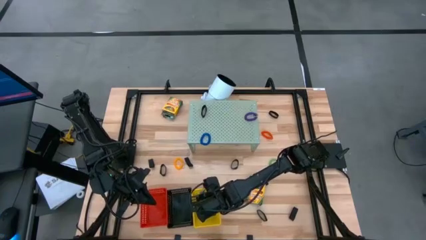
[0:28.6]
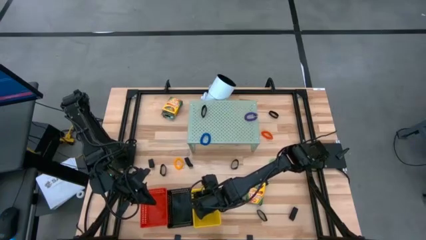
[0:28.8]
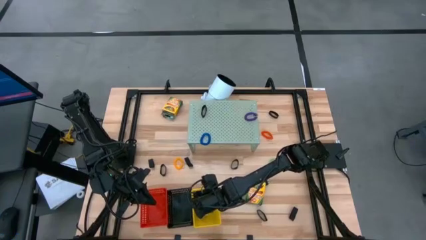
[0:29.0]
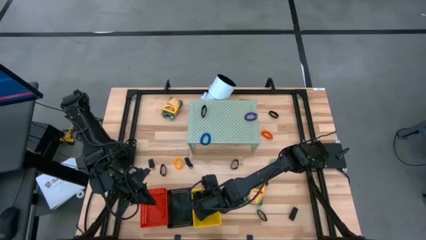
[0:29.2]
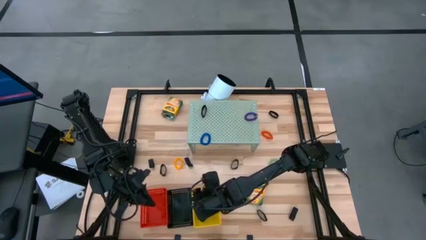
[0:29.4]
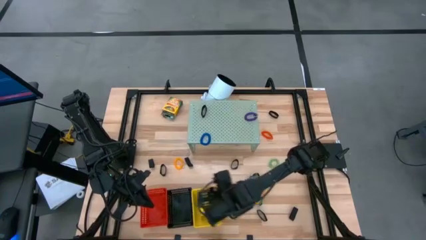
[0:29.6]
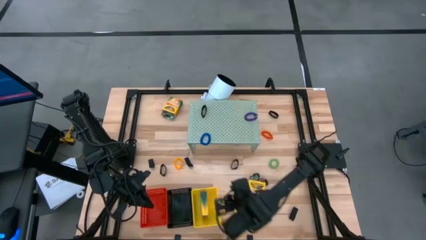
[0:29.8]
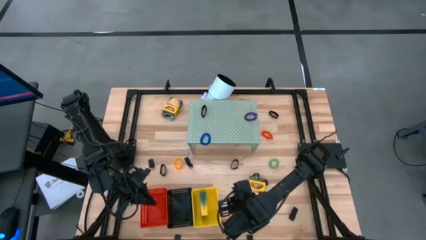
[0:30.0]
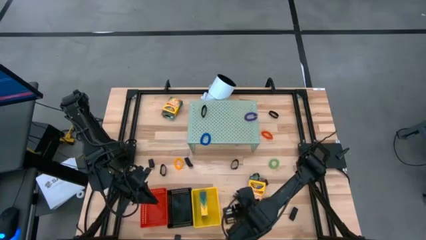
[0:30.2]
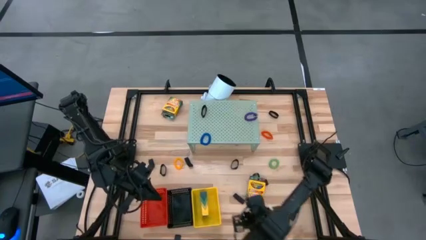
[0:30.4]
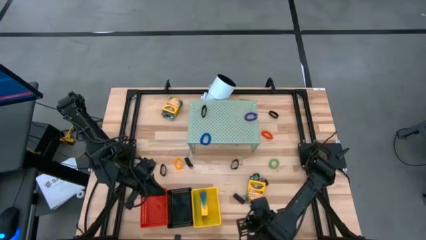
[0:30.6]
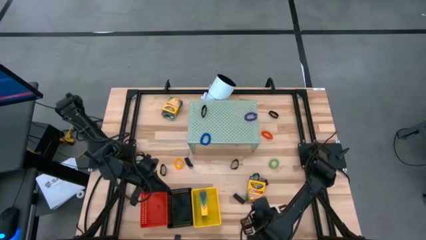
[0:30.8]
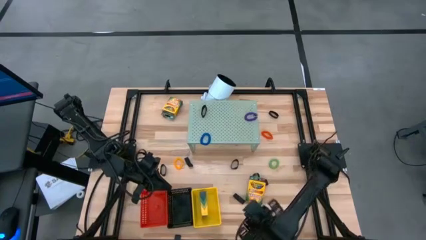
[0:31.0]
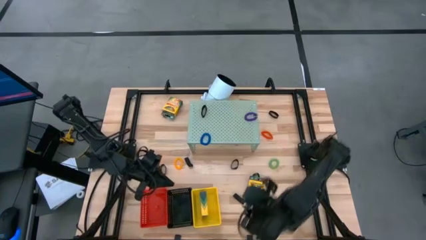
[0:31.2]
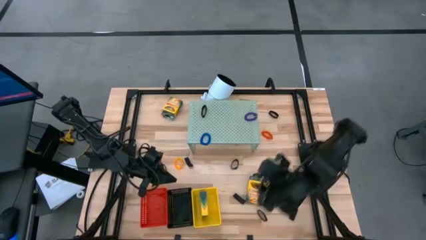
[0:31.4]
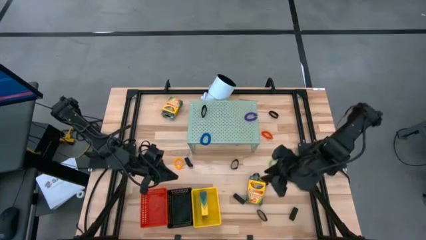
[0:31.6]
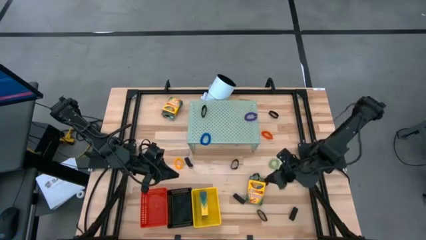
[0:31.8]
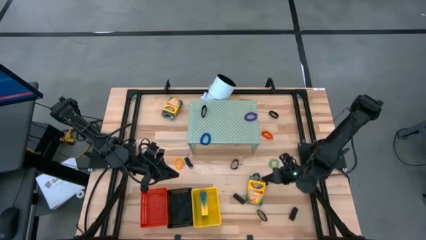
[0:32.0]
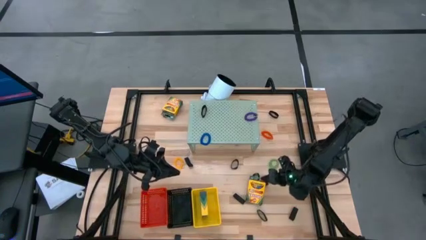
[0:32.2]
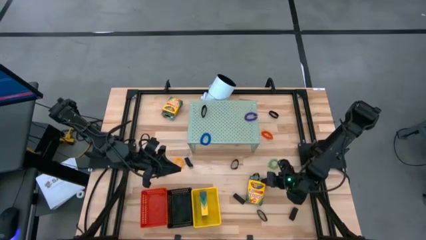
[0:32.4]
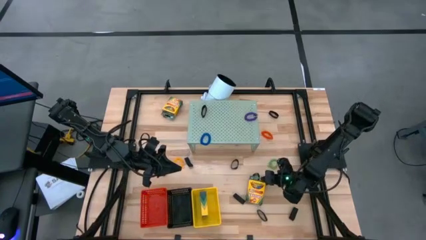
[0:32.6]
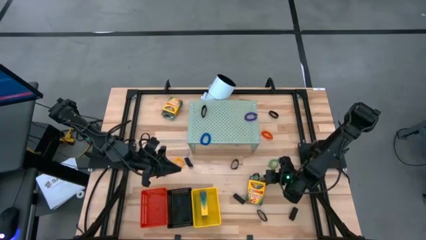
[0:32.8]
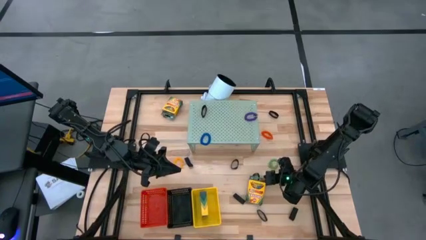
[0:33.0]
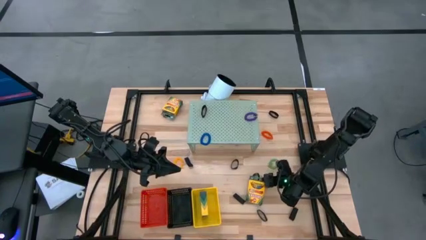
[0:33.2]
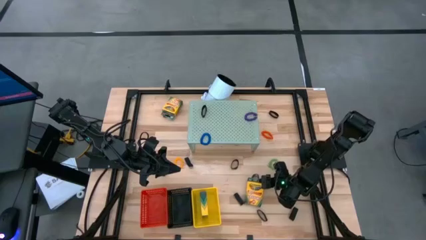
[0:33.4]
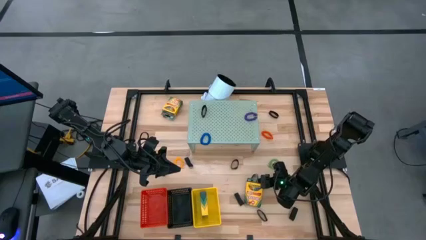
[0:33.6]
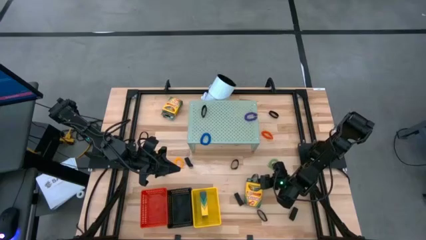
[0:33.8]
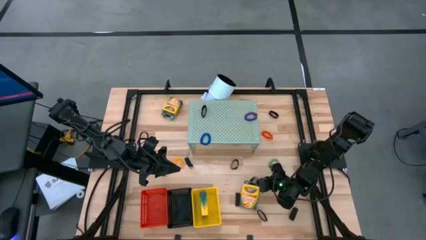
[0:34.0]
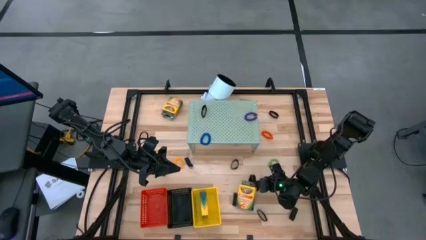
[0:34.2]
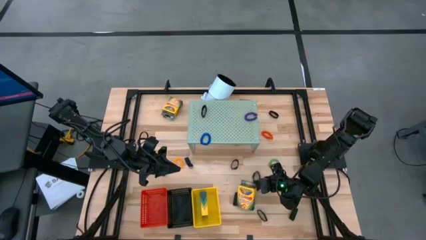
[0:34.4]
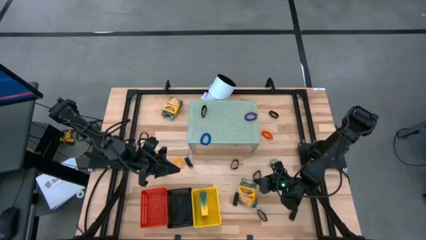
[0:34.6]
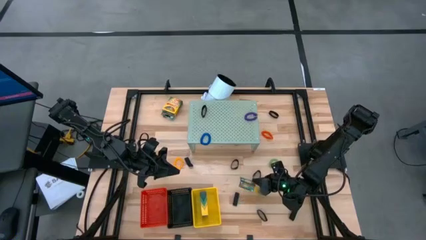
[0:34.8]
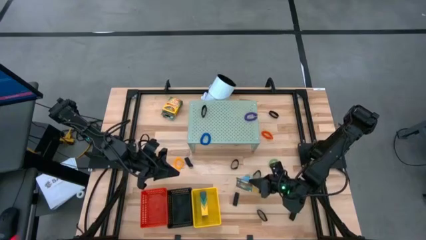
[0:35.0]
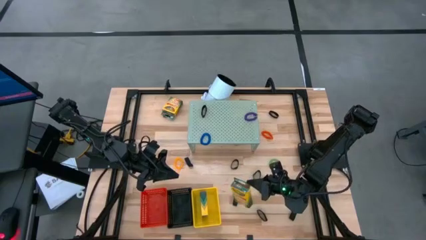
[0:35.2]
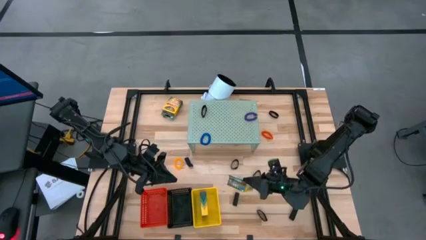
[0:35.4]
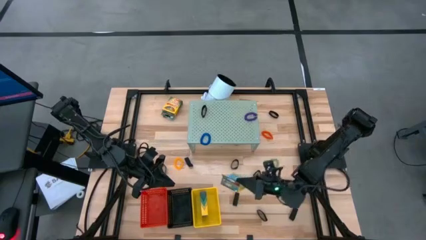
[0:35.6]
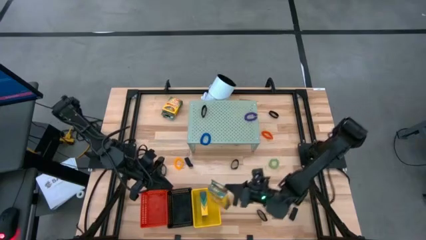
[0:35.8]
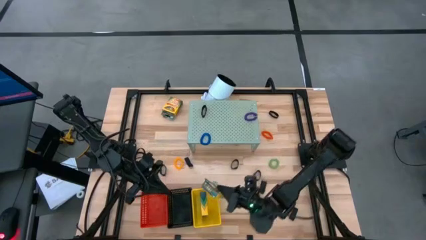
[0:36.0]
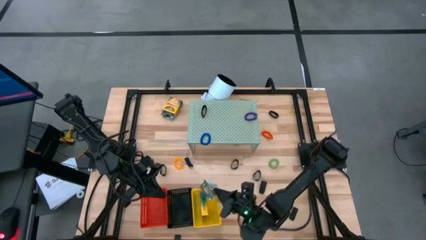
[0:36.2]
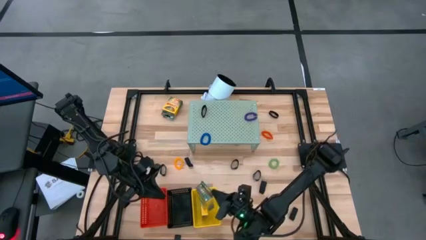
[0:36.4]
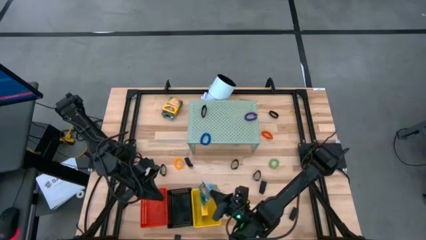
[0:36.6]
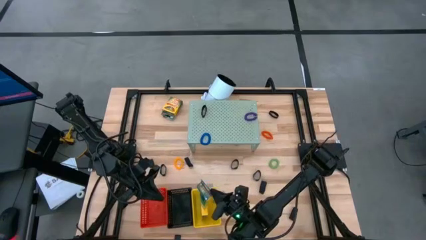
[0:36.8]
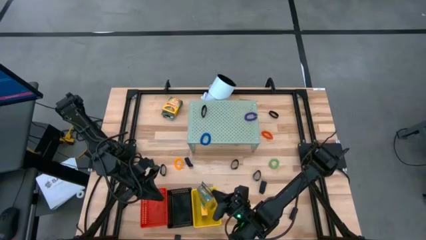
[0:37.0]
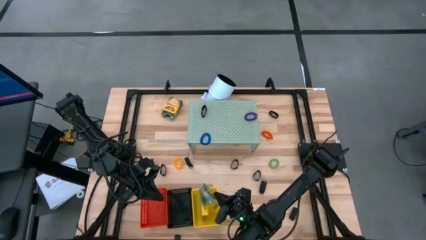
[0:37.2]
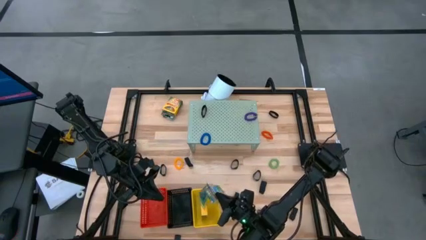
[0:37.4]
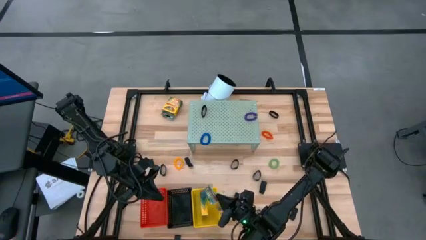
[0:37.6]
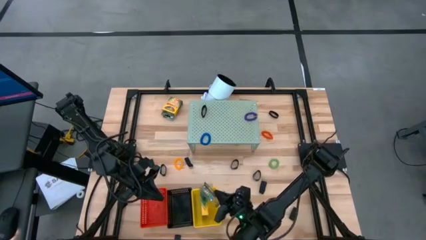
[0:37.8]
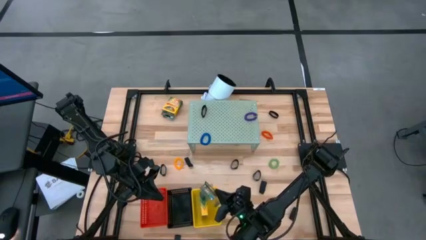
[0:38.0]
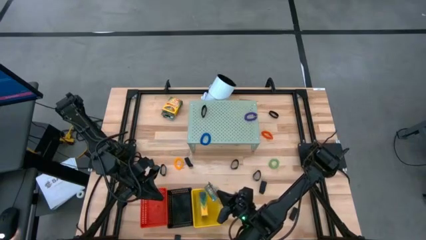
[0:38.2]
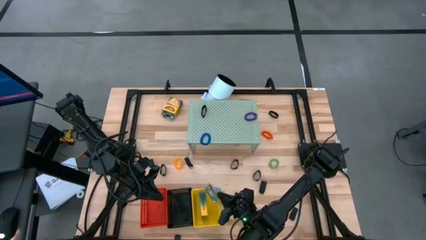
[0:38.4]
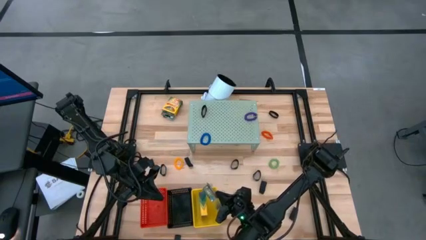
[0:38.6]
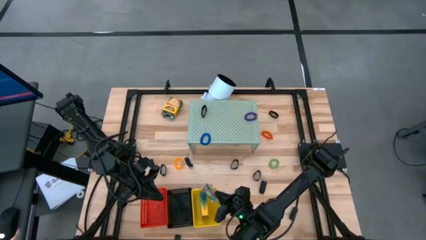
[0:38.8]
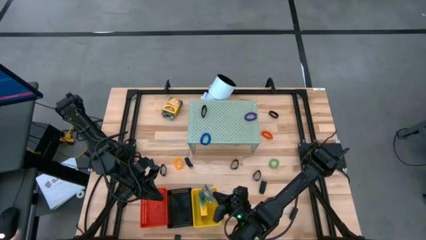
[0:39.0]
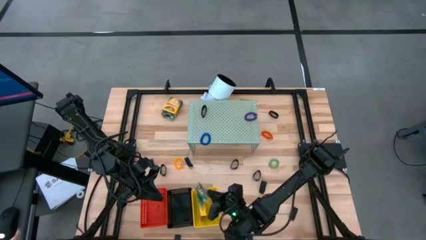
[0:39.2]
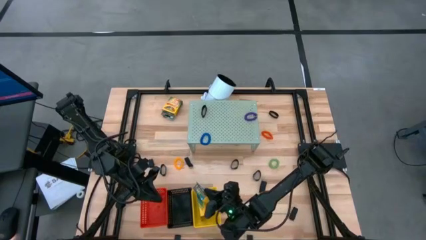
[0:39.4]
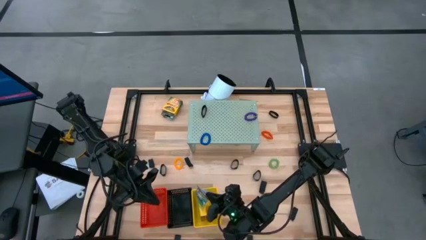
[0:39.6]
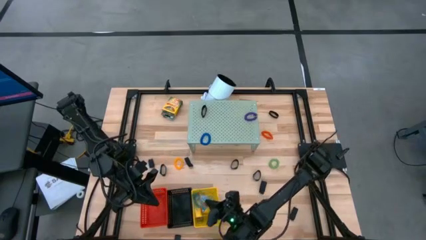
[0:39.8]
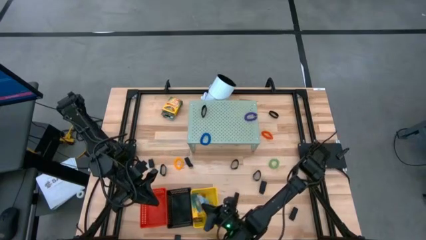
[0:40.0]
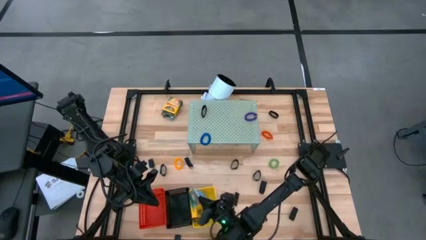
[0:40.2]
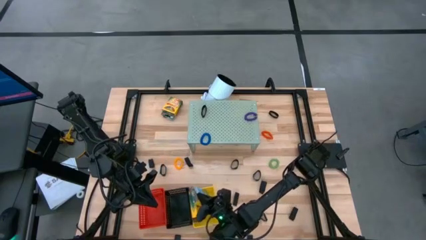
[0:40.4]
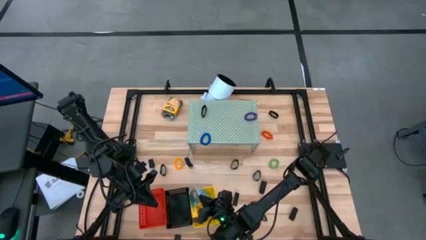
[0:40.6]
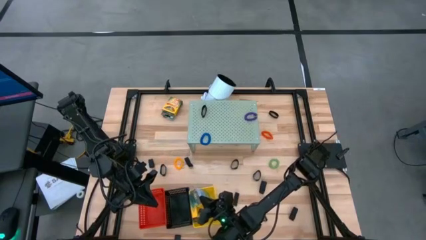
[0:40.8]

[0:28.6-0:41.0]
Task: Pick & Place Office Desk Supplies
Put the yellow crayon box into the yellow bin

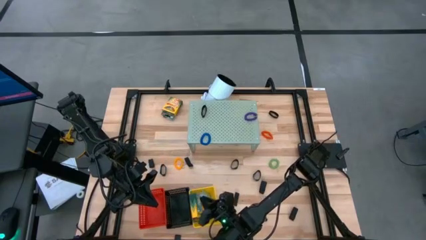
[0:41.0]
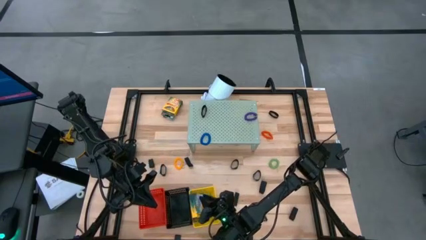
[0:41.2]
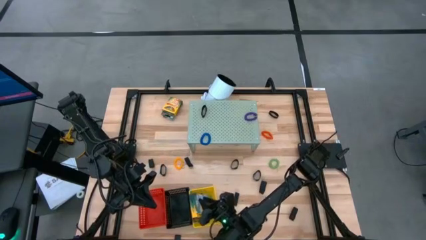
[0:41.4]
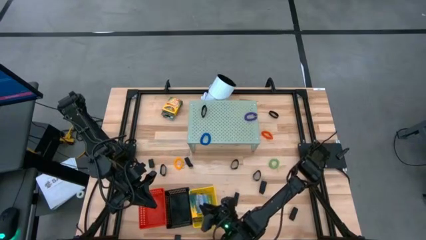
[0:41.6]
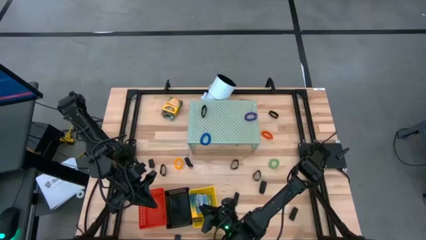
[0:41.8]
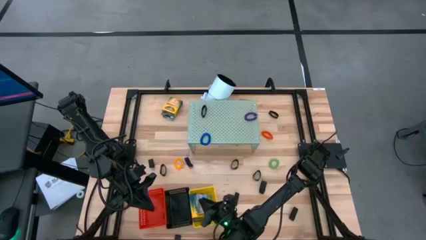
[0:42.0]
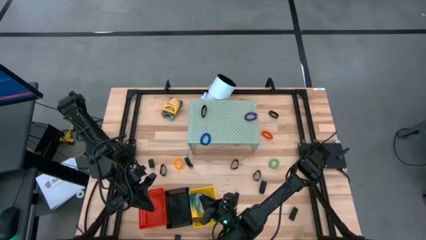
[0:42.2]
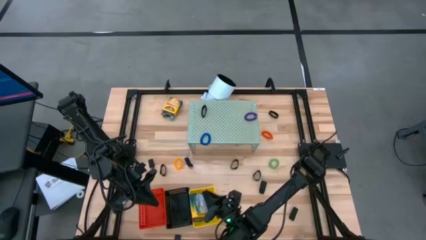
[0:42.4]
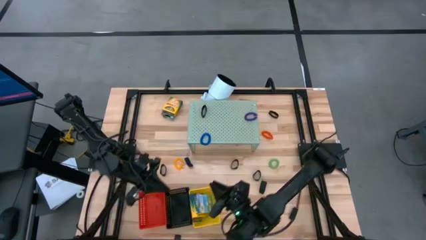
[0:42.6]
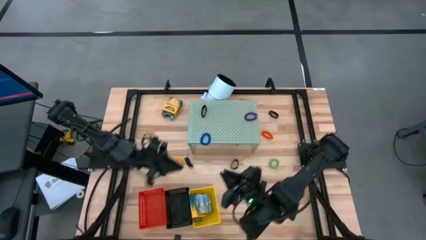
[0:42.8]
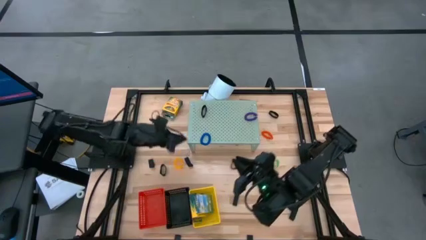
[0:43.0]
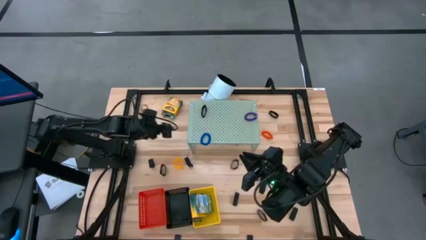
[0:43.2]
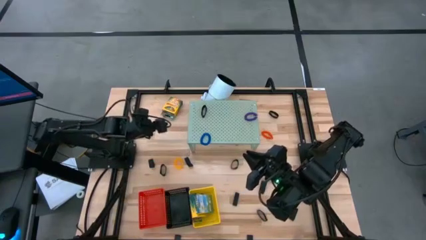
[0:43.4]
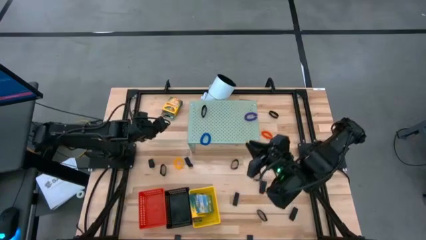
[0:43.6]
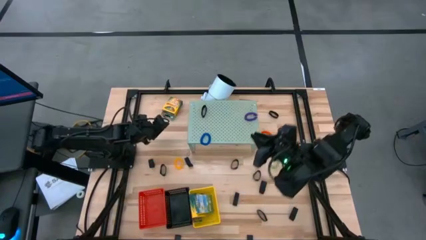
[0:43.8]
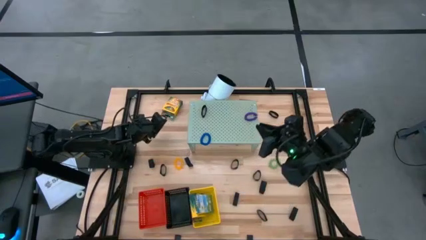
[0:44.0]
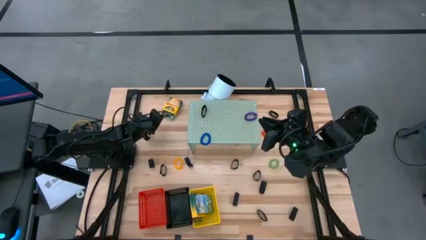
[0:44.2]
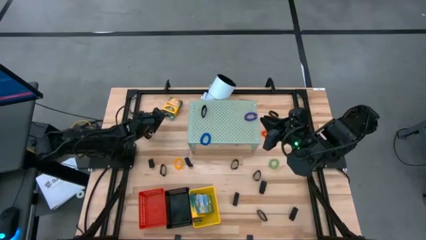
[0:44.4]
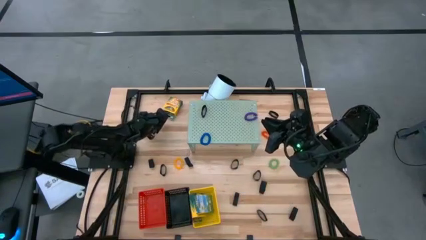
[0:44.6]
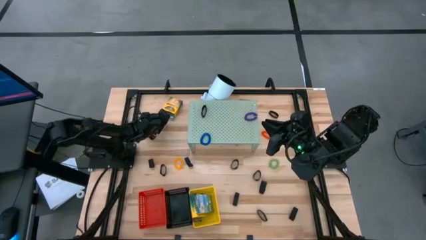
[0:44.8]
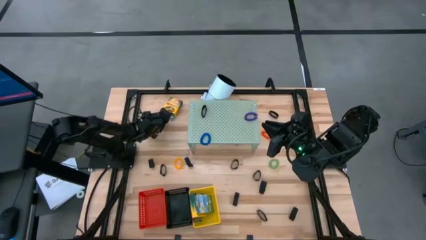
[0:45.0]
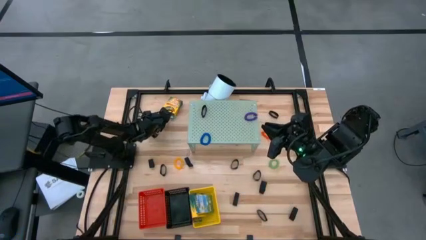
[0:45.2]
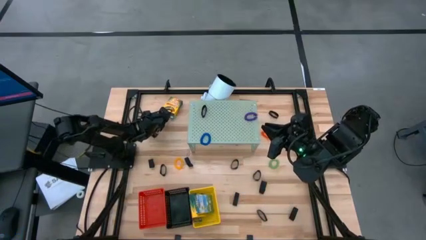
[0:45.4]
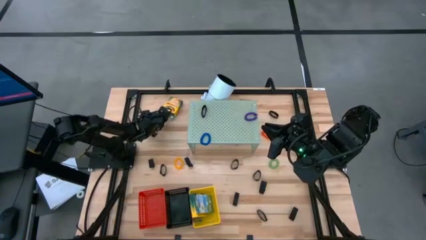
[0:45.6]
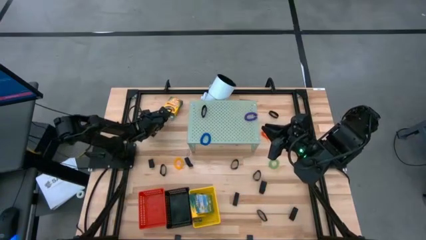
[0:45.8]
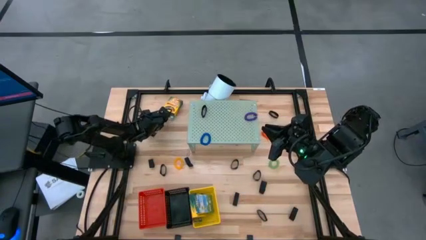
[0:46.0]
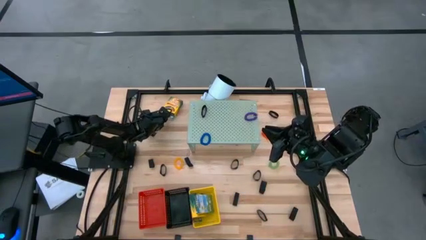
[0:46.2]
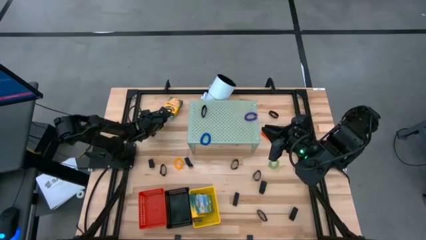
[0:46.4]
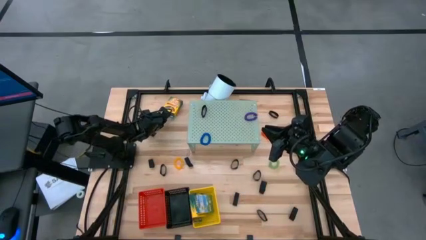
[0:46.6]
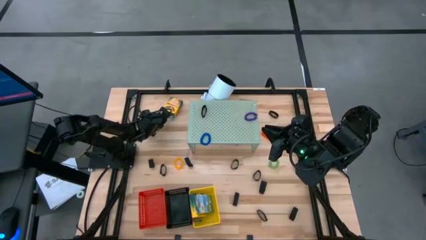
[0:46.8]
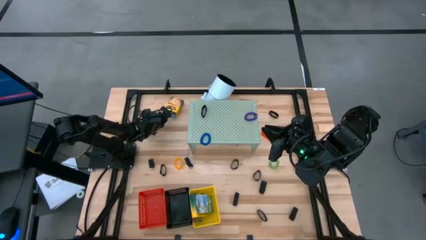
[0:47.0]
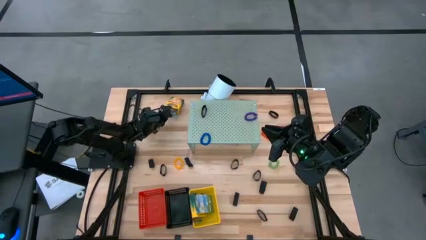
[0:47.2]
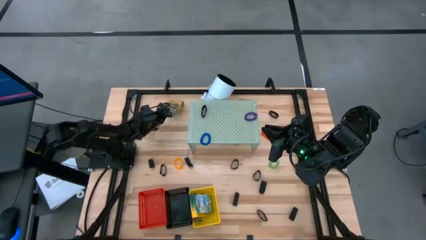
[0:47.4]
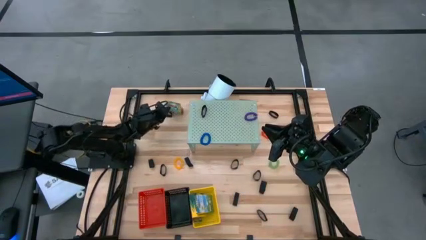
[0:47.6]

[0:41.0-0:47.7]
Put the yellow crayon box into the yellow bin
